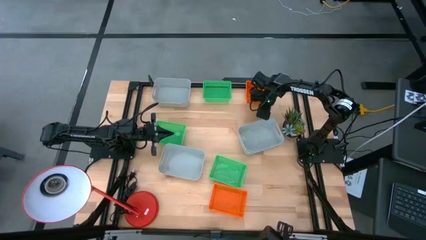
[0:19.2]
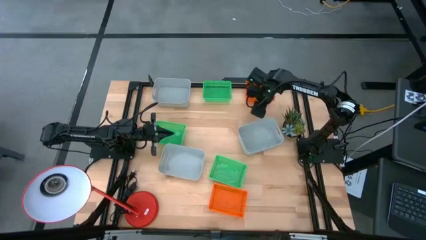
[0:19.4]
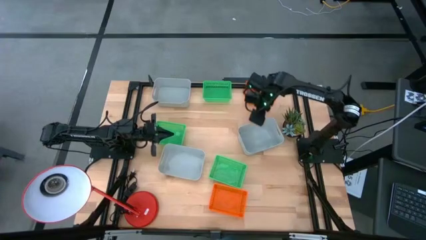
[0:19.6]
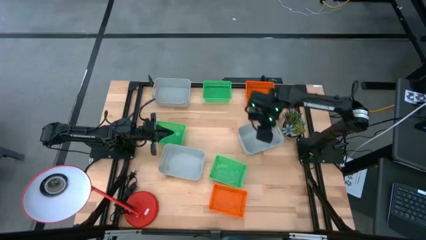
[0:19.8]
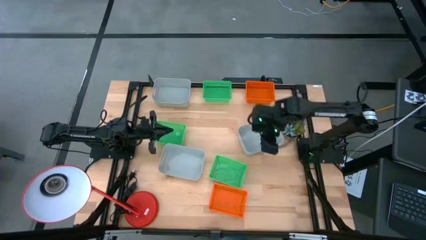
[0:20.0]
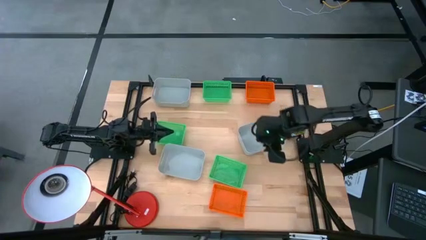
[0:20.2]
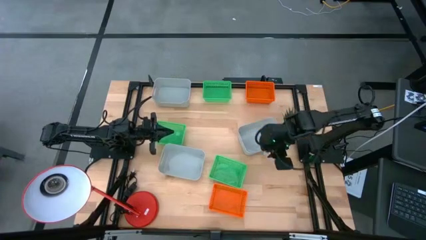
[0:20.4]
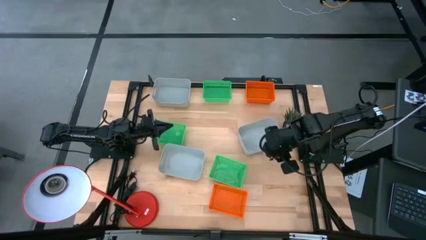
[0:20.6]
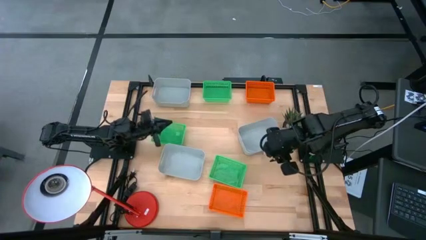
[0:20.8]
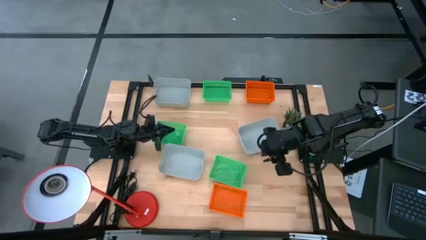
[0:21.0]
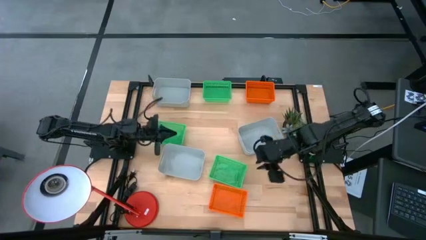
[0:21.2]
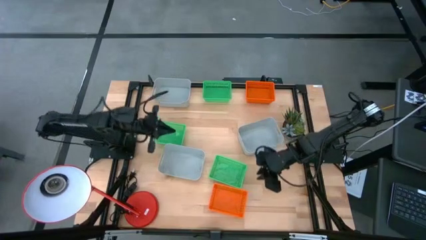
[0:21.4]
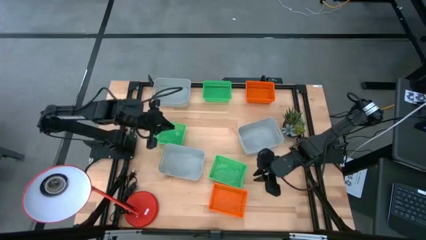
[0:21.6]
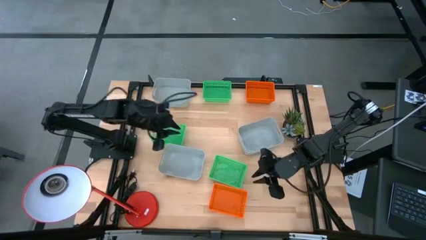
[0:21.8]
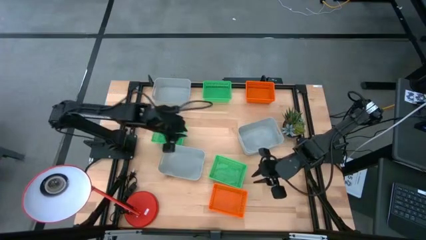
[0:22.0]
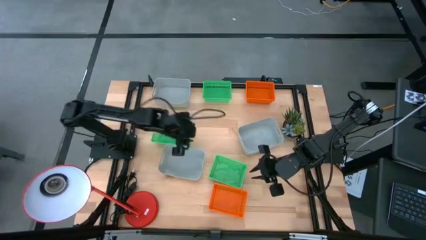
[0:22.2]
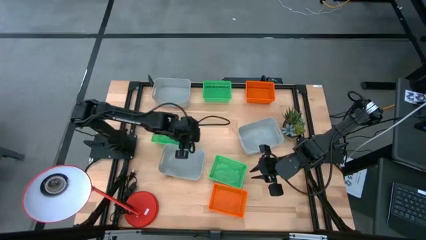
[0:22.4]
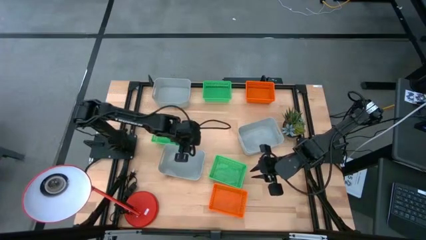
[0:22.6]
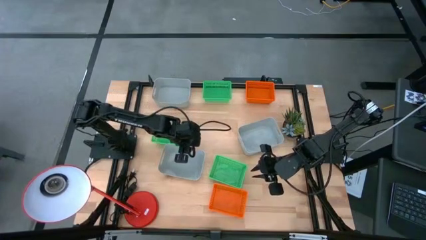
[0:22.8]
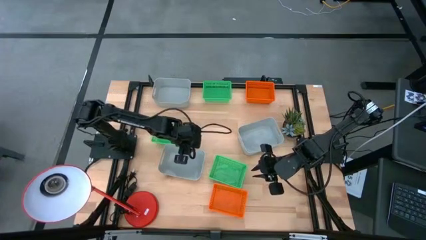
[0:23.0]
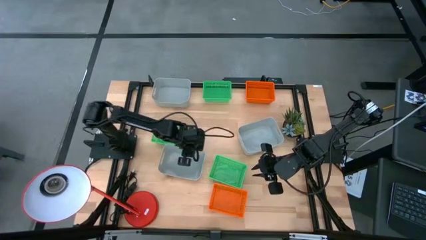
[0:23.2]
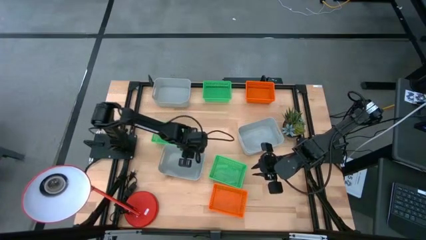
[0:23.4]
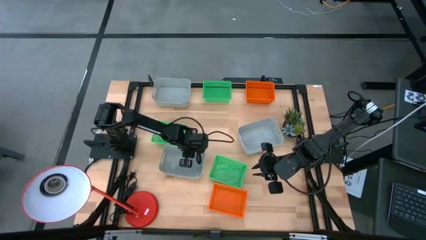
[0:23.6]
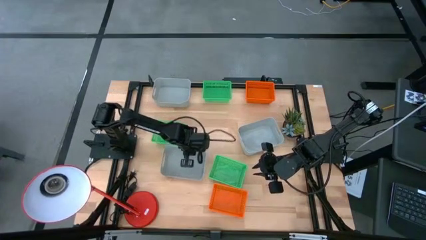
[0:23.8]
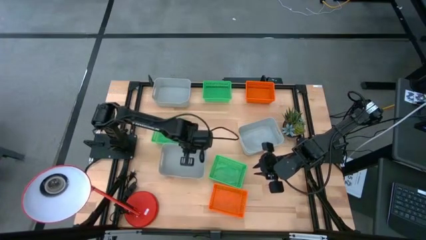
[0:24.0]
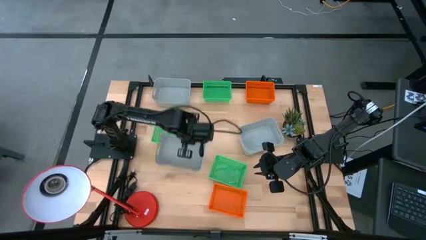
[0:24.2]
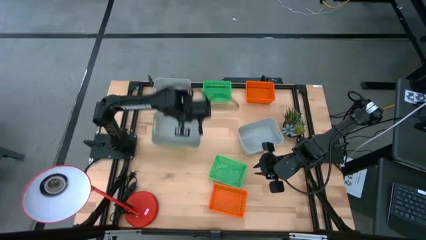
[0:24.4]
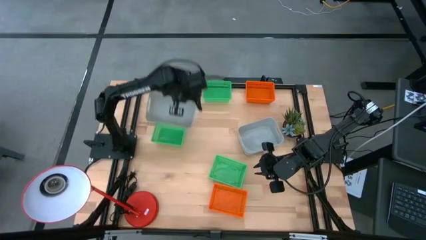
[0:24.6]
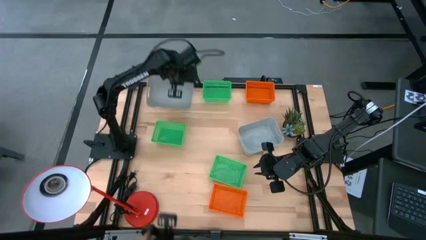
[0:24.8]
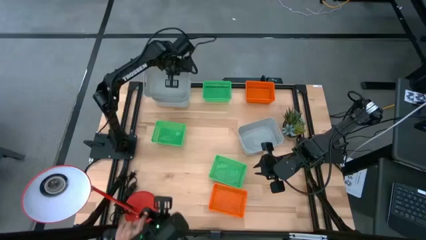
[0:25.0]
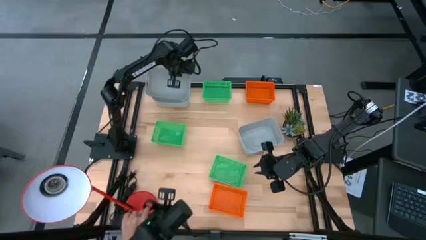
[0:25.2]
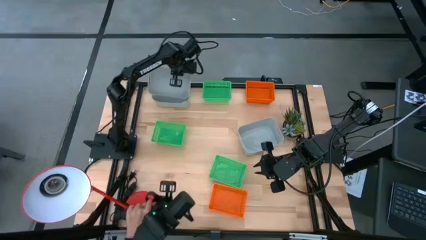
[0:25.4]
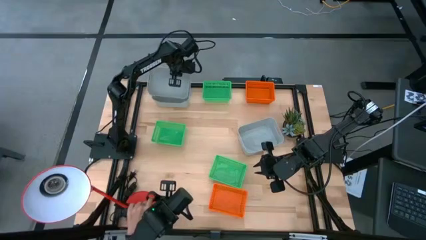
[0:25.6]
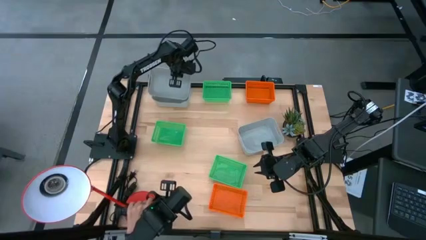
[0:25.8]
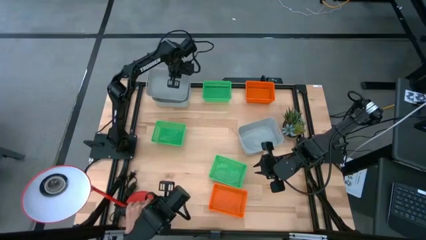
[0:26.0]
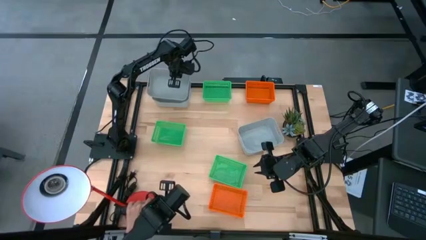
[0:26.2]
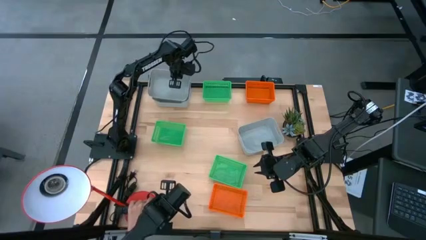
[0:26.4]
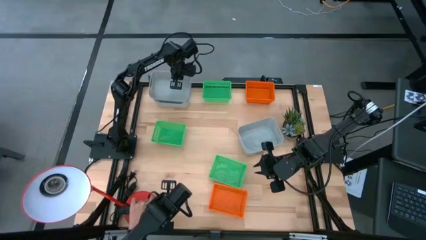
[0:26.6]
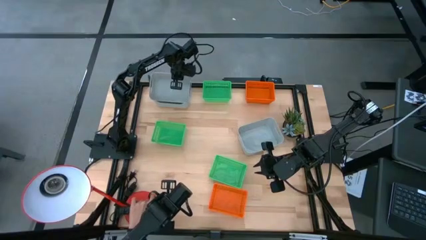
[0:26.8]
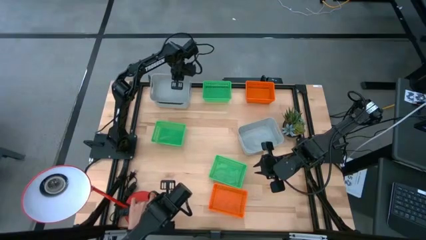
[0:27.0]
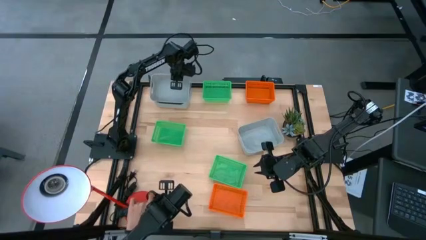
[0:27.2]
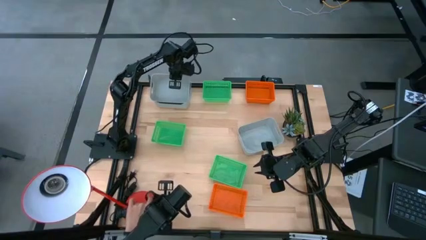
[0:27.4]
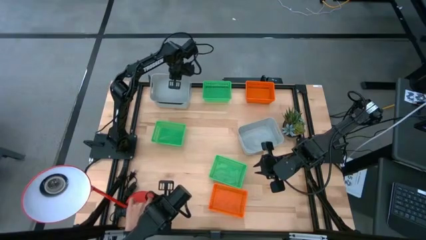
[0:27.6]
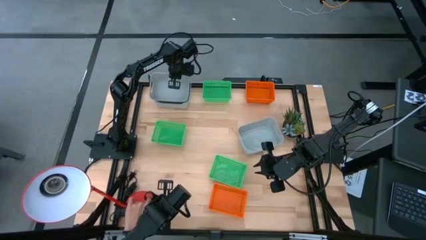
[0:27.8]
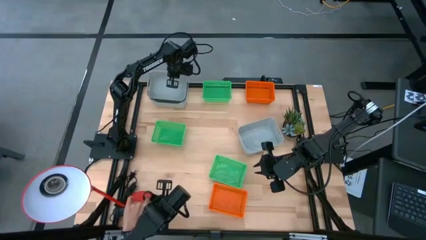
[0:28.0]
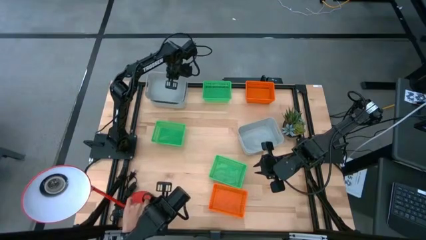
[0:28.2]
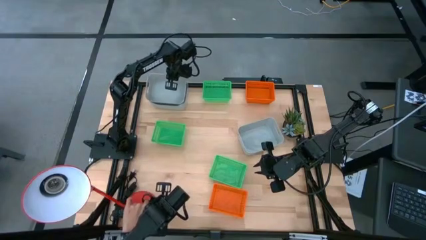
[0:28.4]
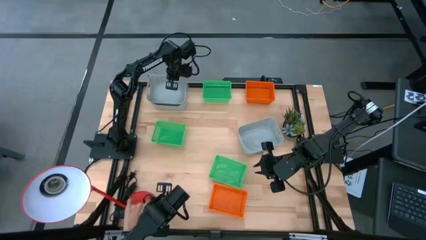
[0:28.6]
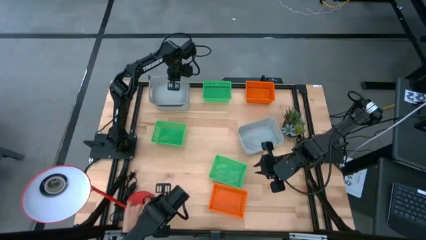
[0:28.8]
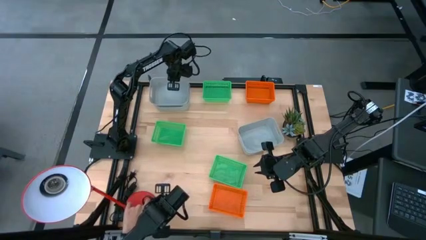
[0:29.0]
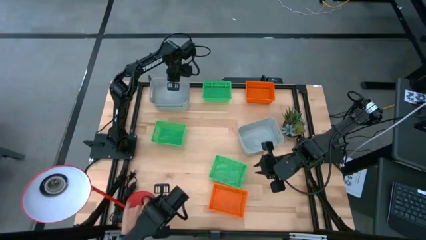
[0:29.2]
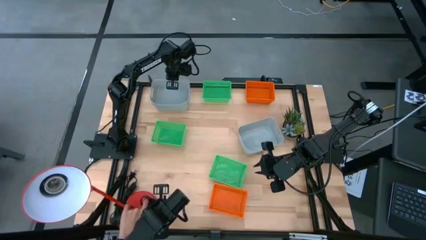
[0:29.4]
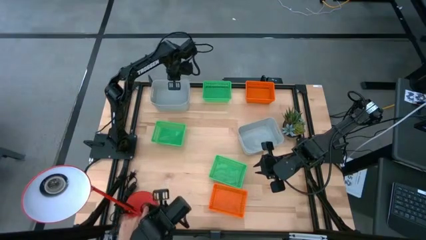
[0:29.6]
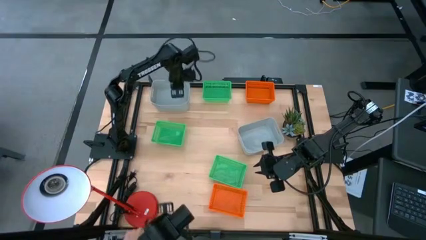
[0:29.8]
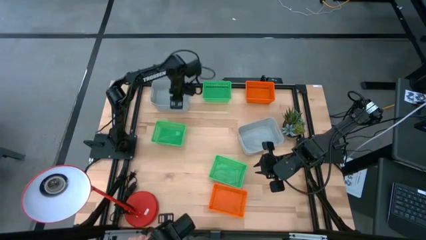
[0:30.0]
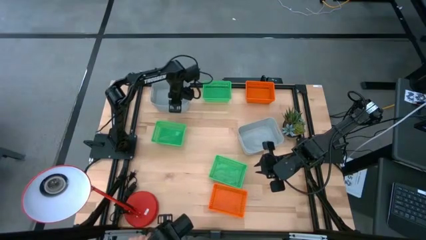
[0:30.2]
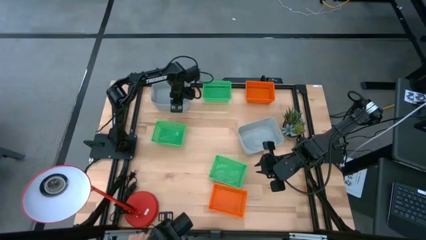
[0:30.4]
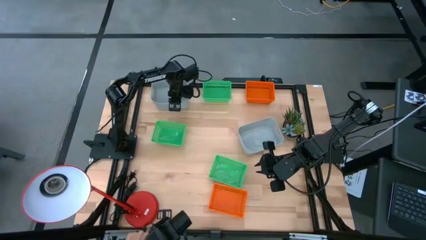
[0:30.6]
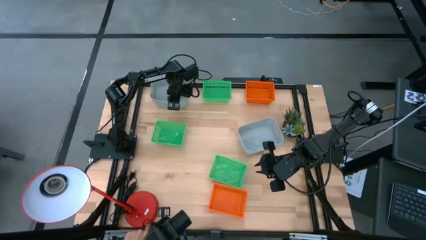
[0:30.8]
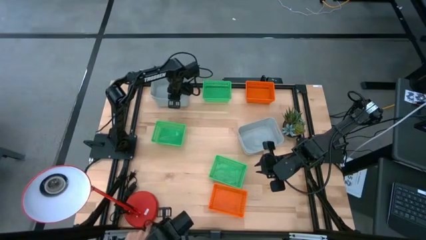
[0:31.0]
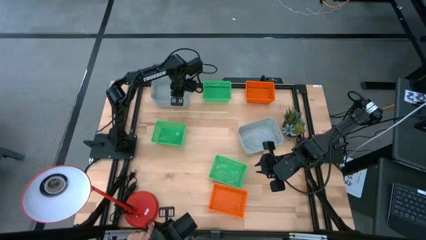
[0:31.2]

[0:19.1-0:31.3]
Stack the bottom gray bin on top of the top gray bin

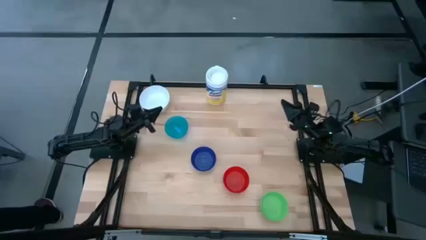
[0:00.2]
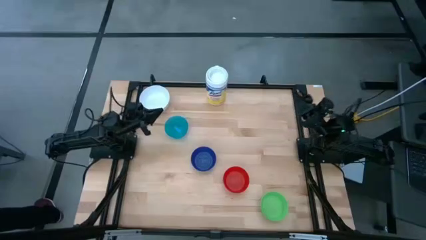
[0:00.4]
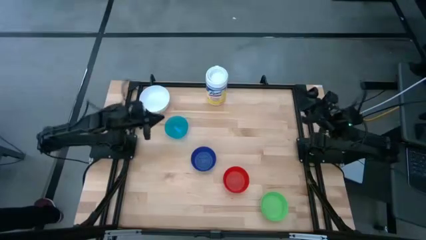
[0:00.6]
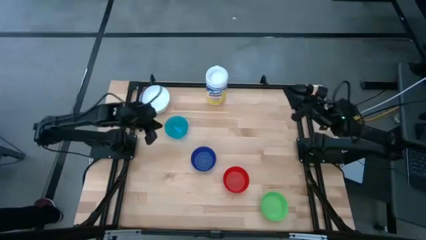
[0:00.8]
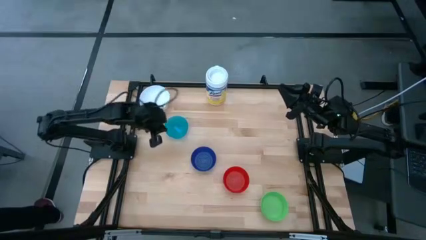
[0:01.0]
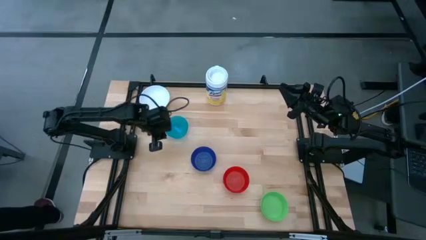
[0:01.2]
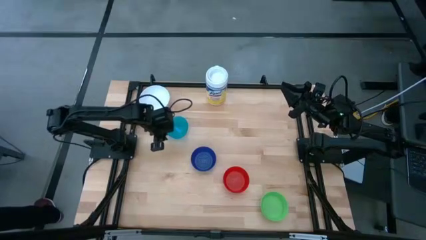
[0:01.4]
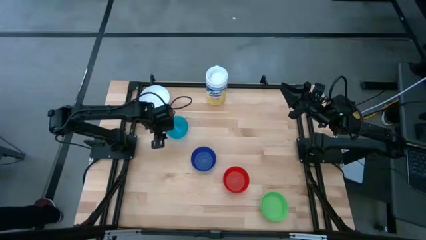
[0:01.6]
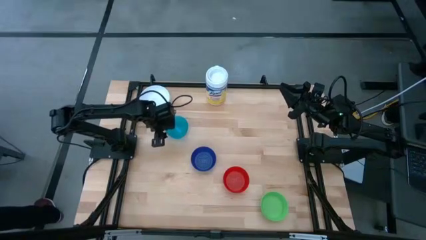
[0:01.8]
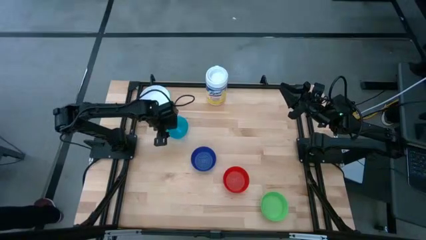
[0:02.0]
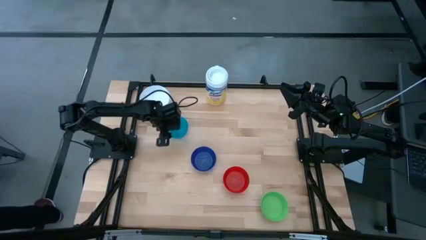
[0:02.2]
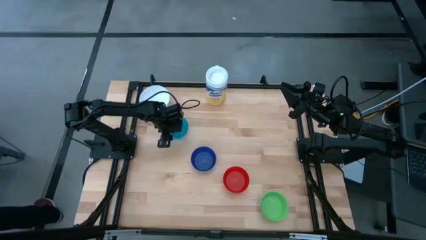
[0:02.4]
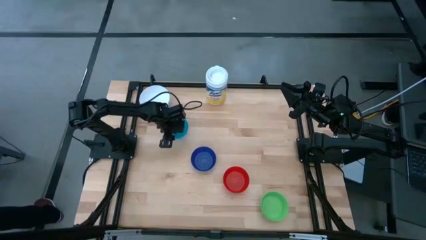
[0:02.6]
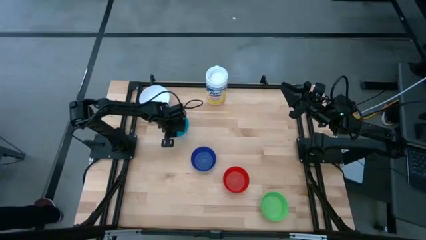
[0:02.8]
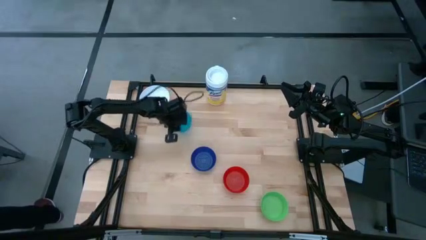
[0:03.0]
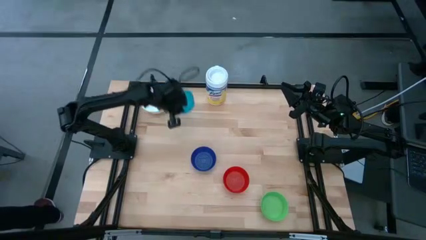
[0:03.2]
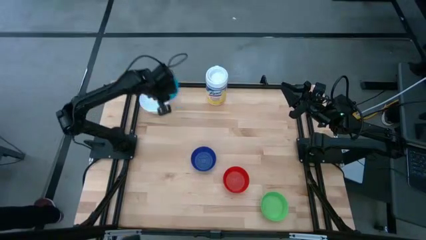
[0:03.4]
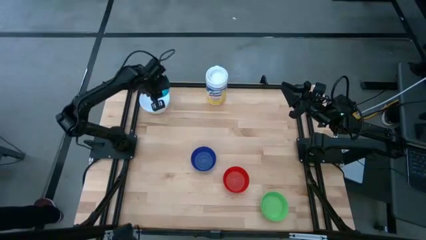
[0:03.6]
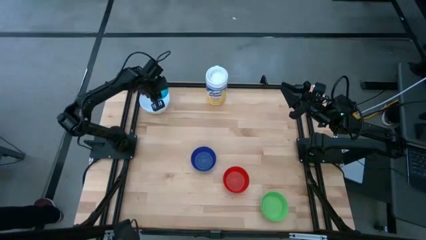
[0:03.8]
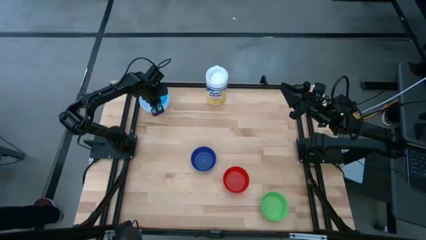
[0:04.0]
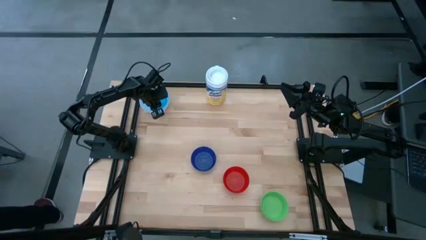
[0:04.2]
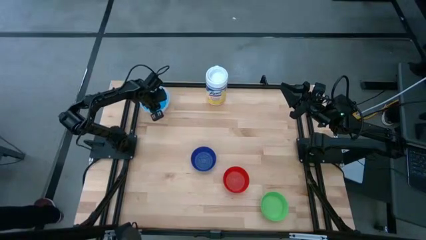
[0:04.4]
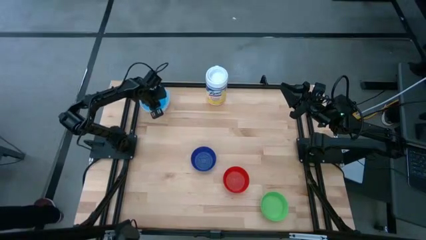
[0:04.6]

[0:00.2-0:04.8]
Stack the light blue bowl on top of the white bowl
